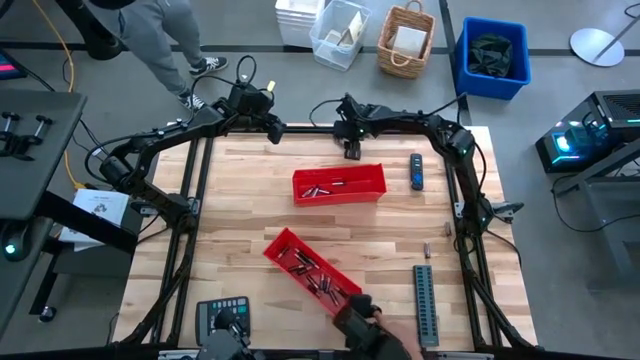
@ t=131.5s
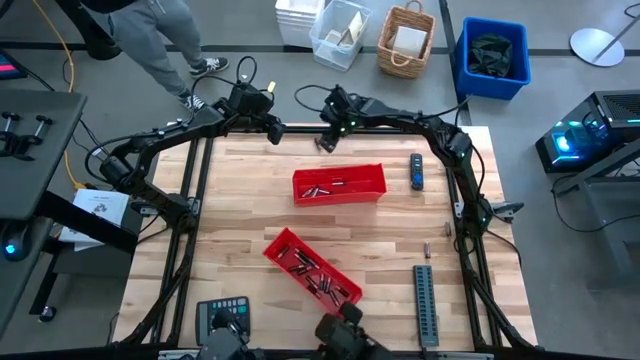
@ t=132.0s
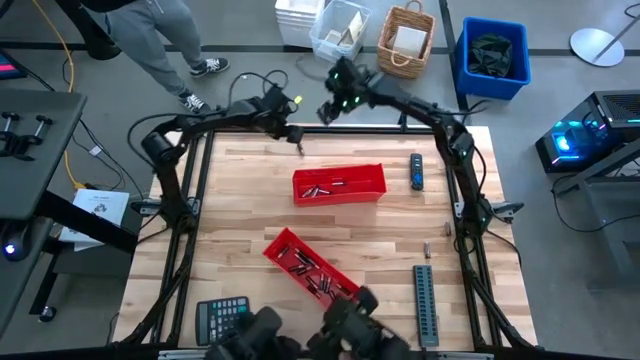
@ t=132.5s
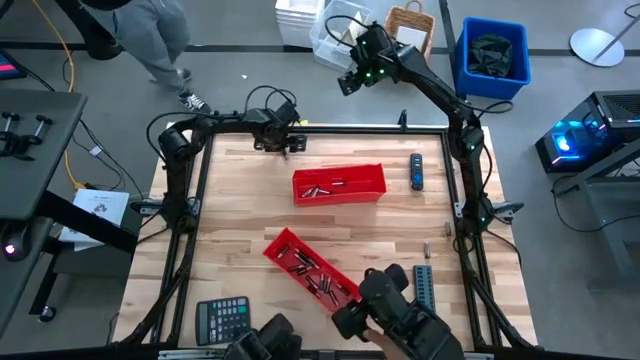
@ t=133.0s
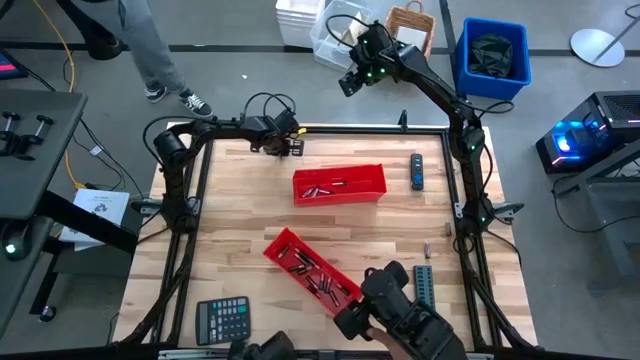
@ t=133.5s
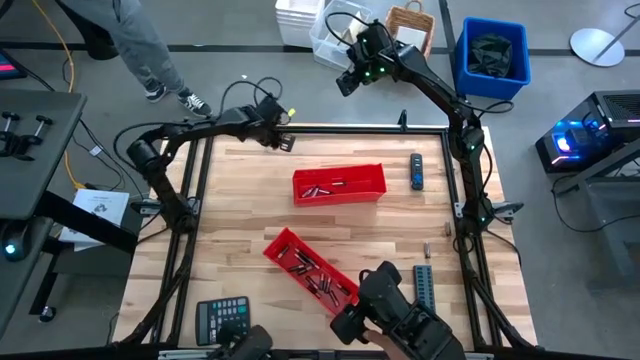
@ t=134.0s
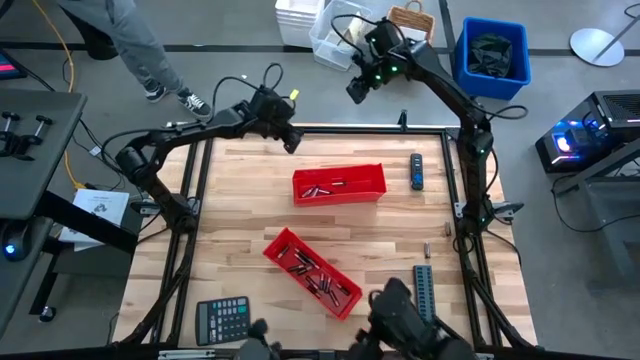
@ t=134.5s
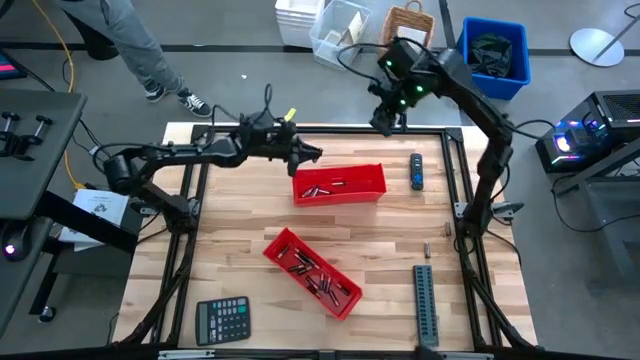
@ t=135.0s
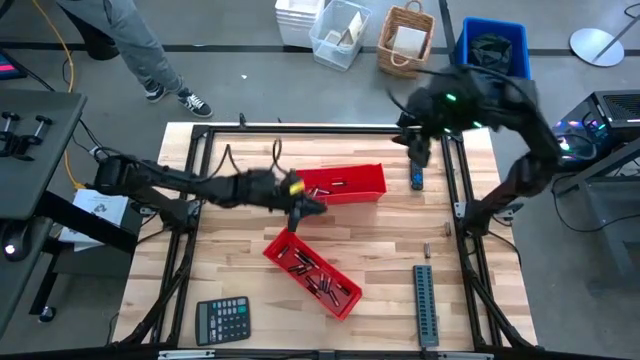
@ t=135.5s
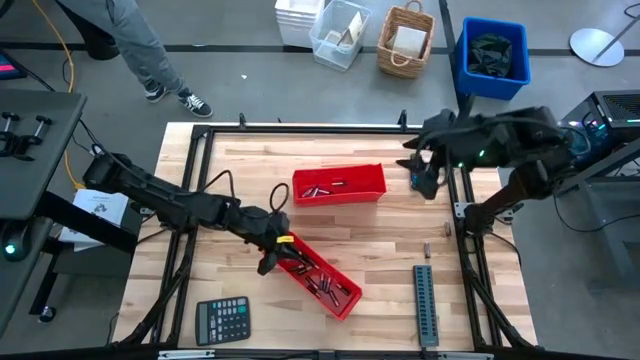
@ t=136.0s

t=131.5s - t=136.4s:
Task: Sort batteries
Put the black battery into the bottom red bin

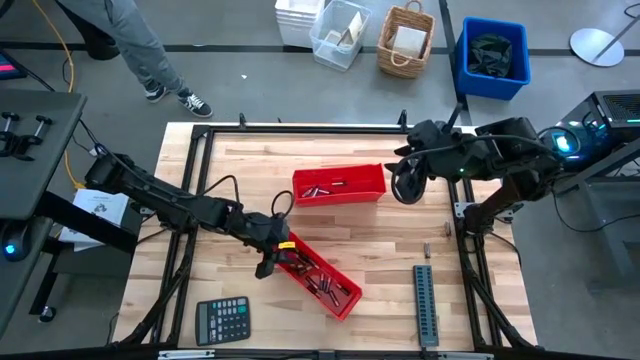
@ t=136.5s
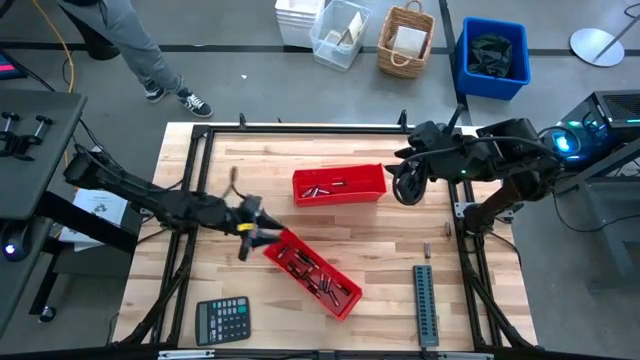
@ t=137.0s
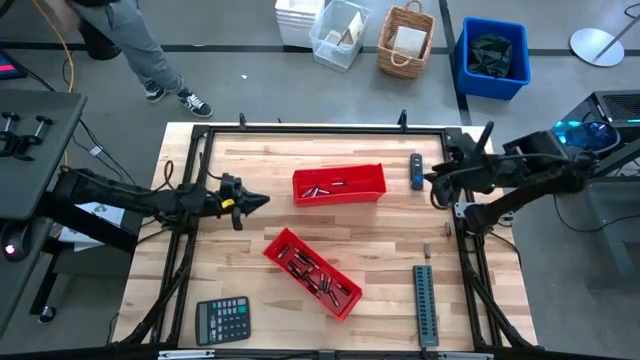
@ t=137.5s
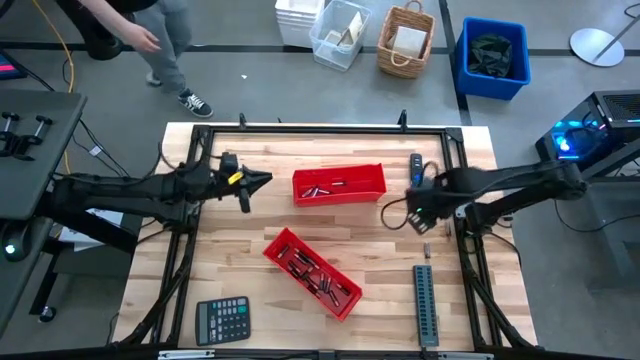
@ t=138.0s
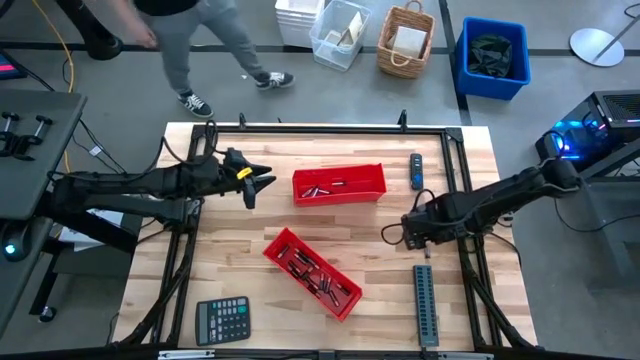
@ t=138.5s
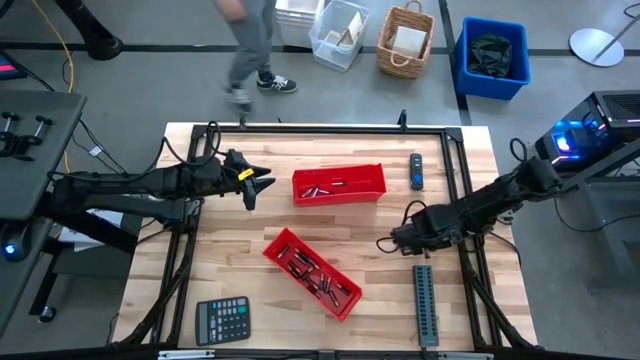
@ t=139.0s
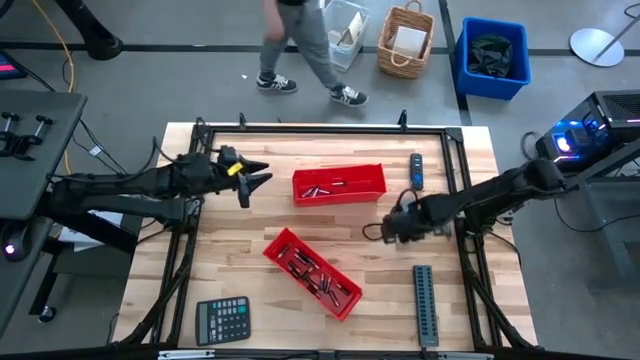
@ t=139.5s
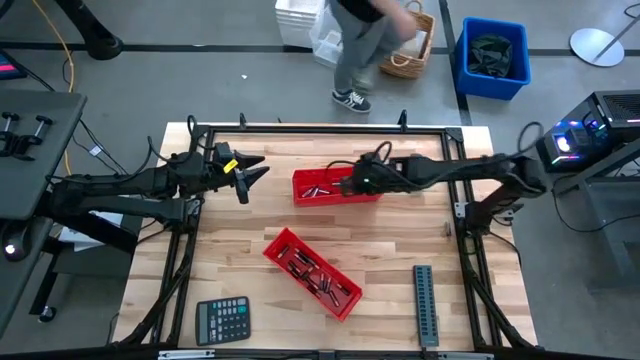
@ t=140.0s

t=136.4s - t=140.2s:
Put the silver battery into the top red bin

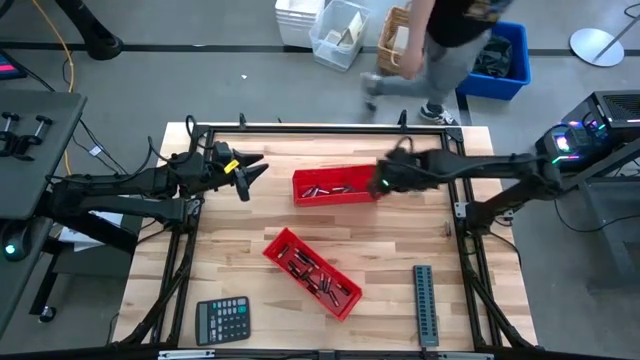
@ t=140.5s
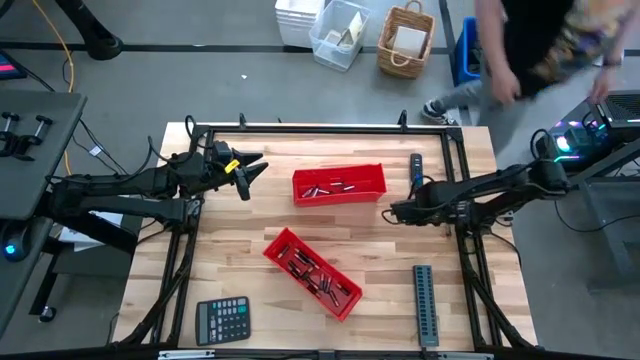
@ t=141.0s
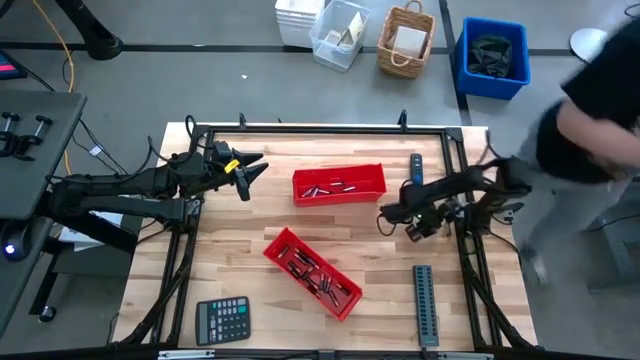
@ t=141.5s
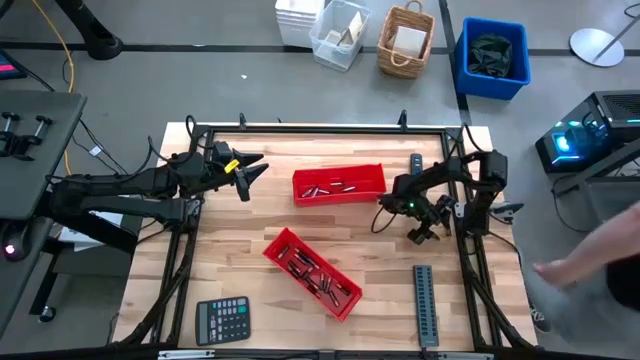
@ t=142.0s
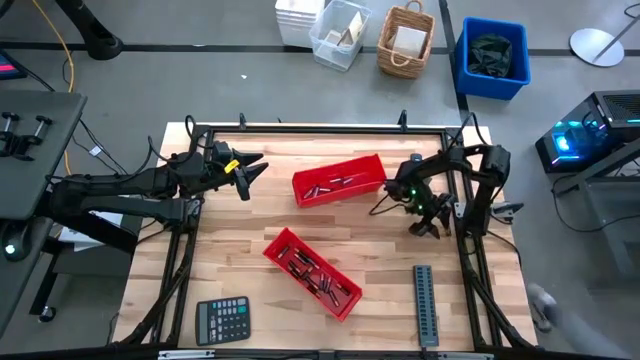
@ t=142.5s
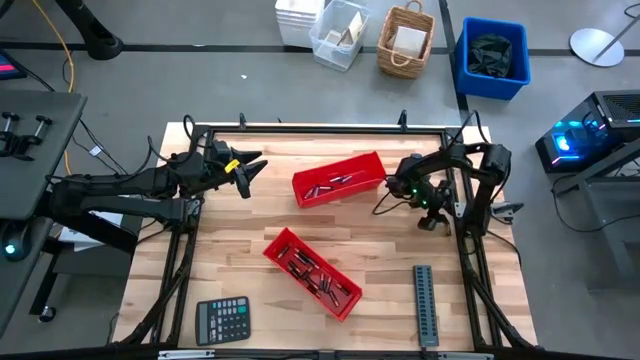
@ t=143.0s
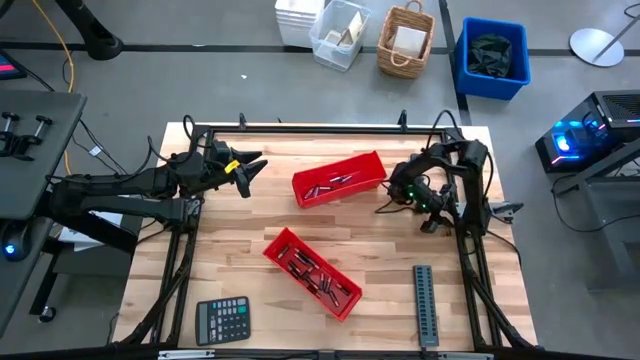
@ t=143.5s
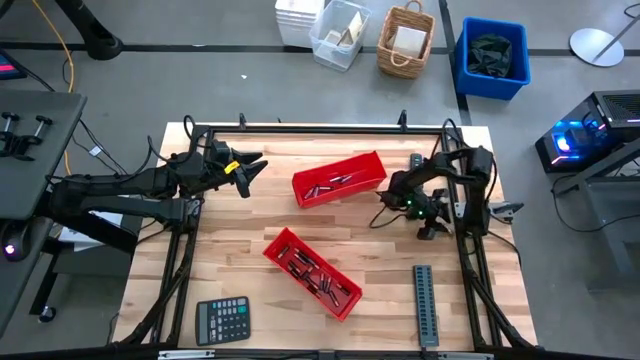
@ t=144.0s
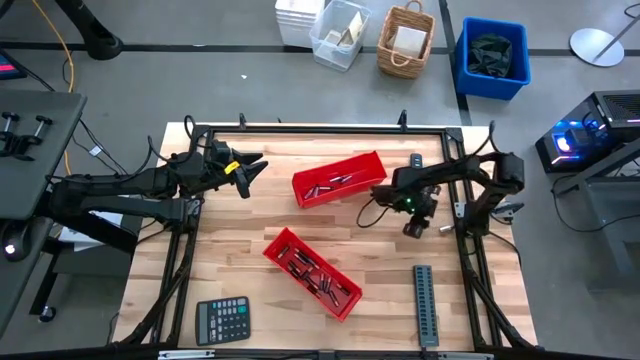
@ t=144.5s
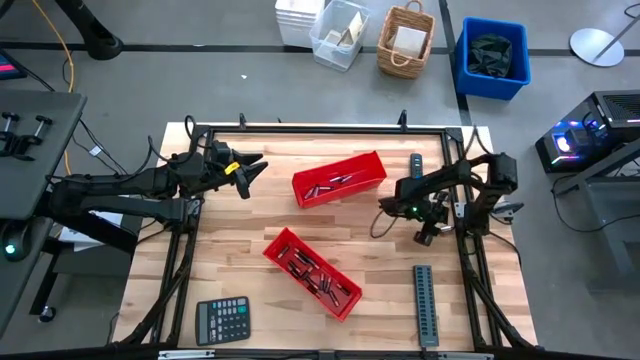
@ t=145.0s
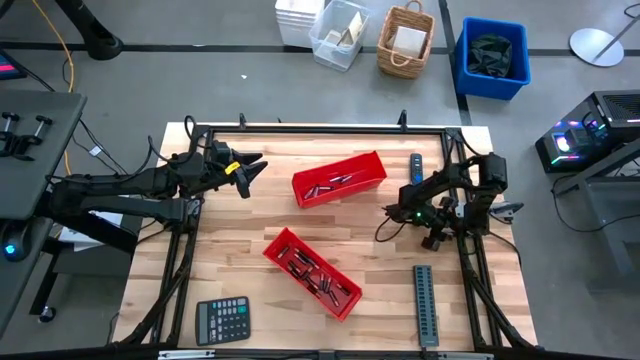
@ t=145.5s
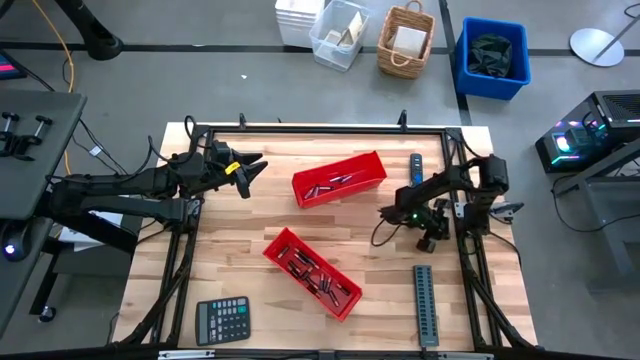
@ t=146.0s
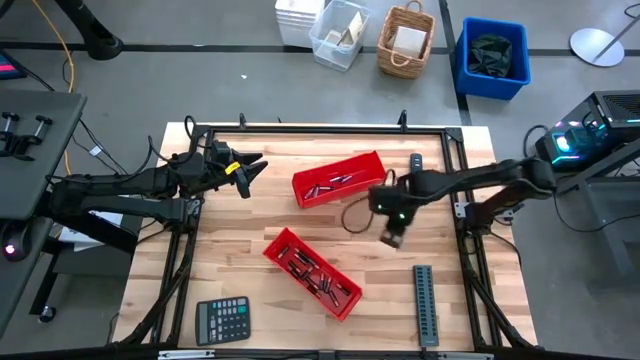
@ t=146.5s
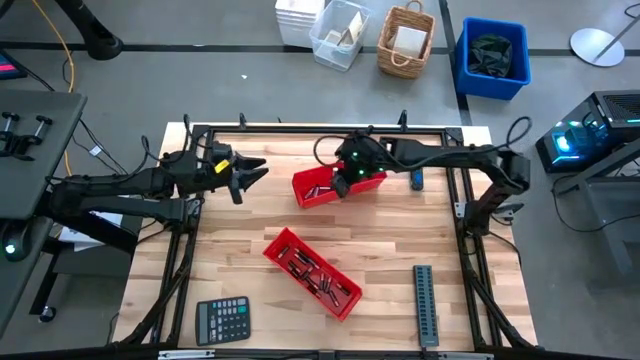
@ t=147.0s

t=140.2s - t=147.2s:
Put the silver battery into the top red bin

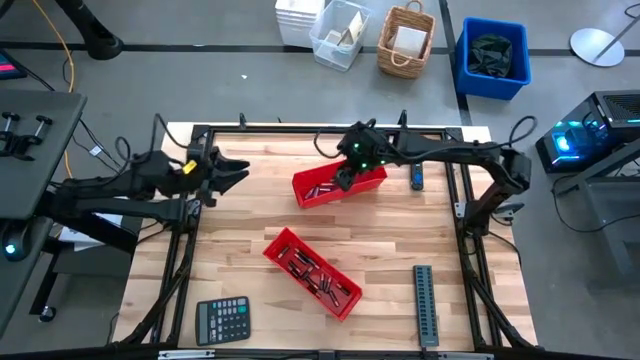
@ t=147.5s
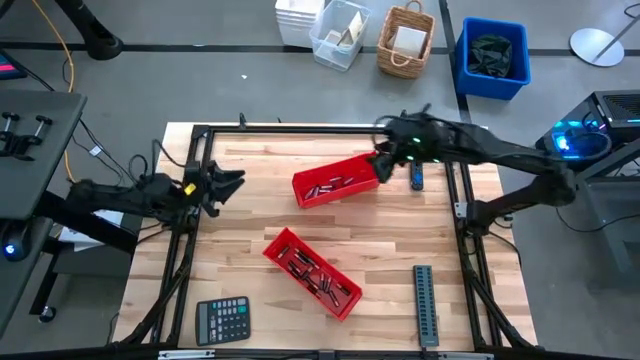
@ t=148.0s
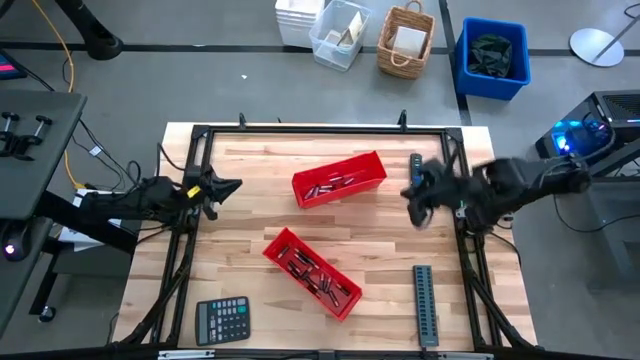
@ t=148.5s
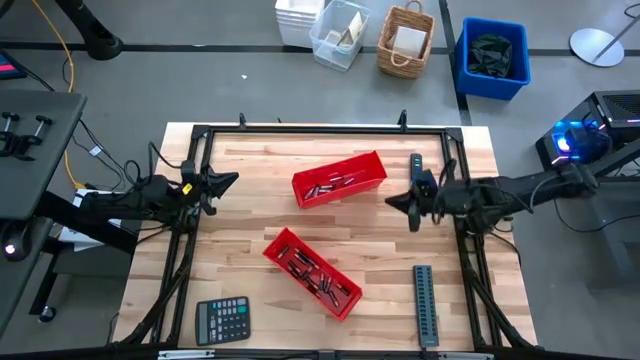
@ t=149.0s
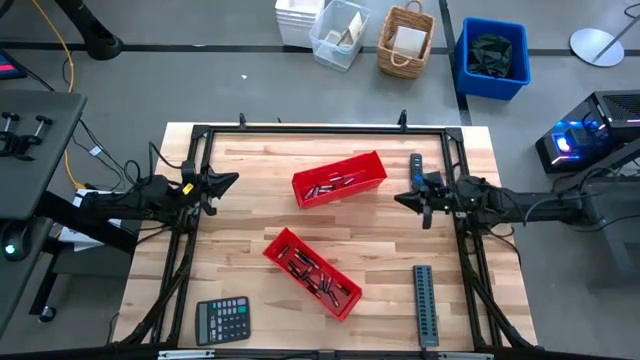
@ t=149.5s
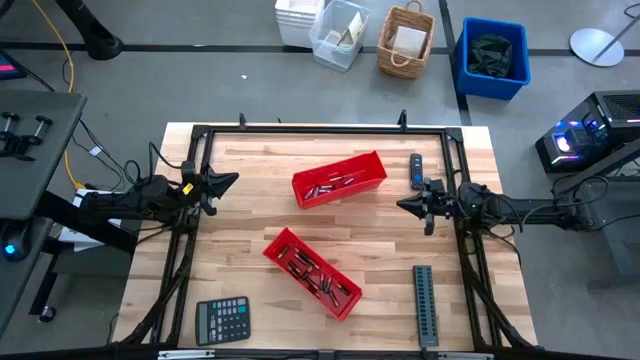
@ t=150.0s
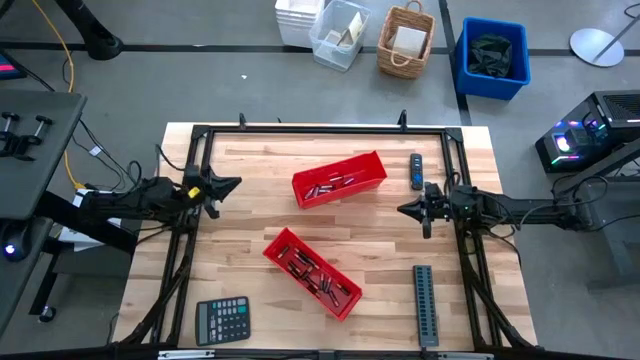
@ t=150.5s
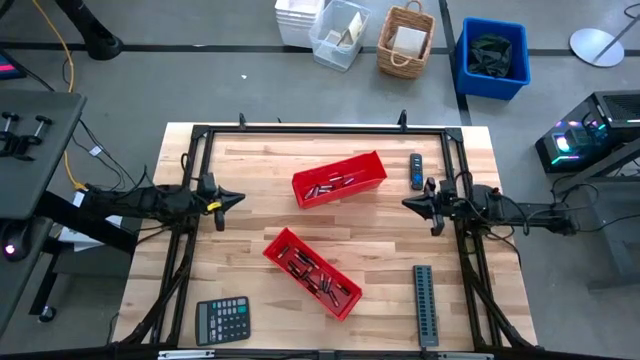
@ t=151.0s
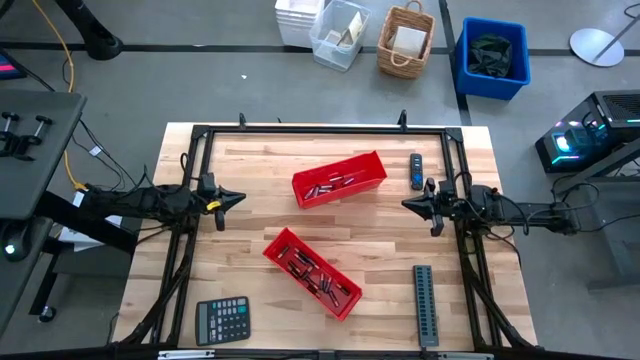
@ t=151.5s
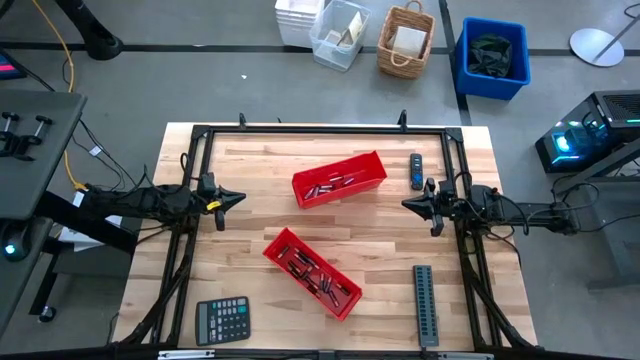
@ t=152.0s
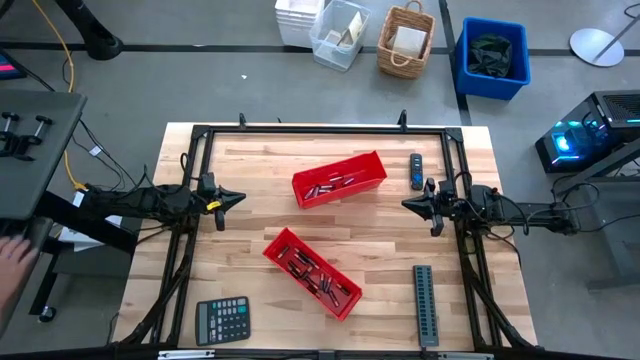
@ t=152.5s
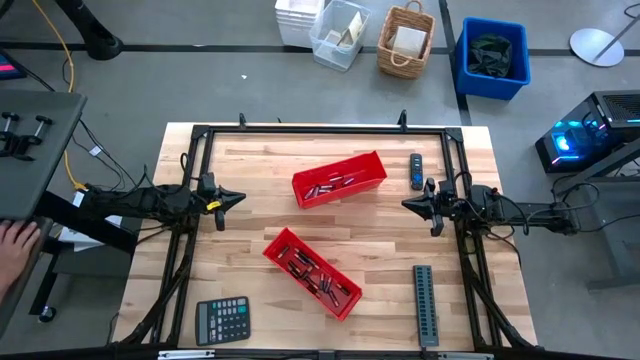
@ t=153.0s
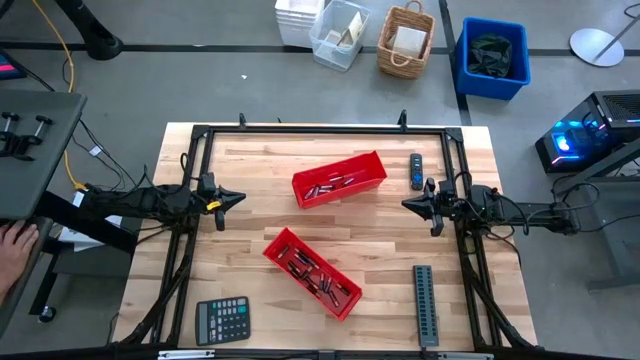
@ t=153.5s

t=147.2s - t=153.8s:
Return to Home Position
